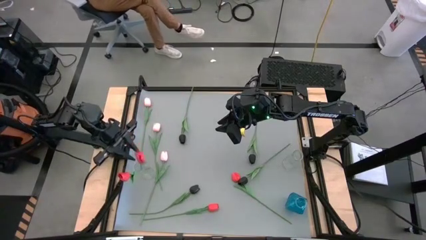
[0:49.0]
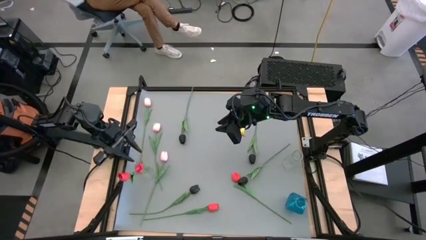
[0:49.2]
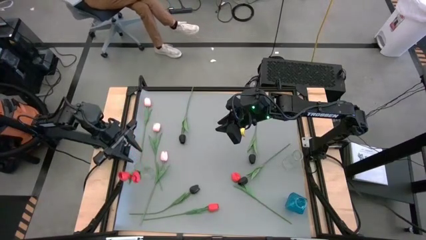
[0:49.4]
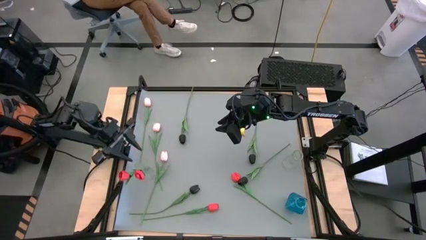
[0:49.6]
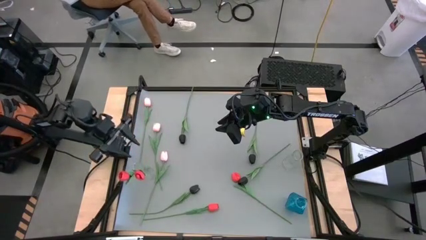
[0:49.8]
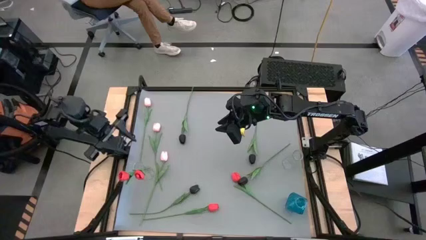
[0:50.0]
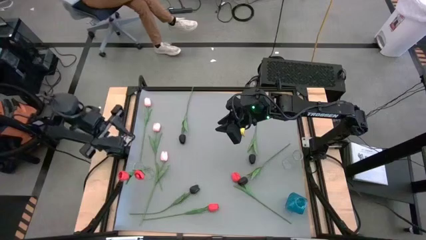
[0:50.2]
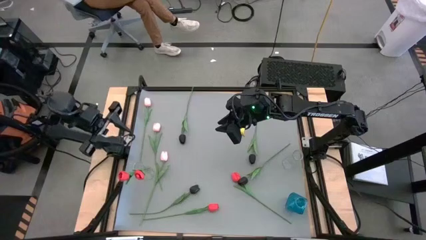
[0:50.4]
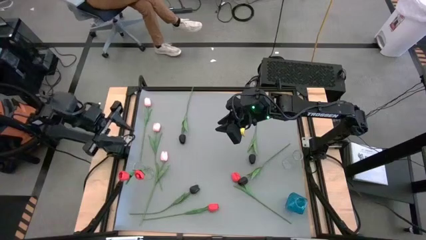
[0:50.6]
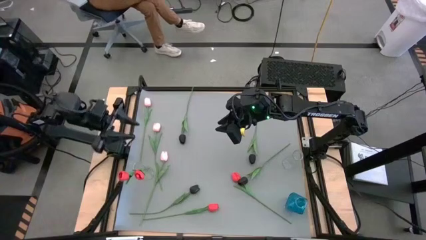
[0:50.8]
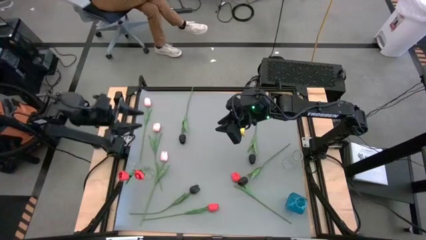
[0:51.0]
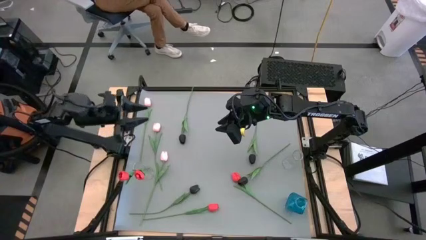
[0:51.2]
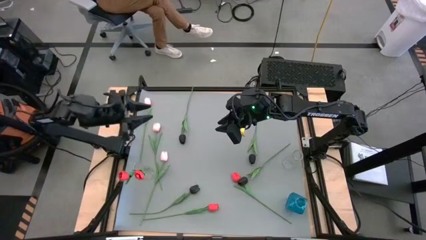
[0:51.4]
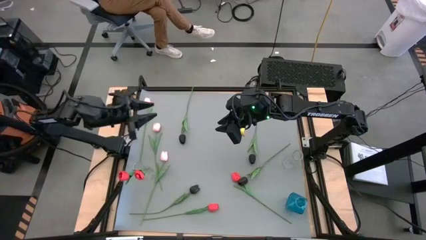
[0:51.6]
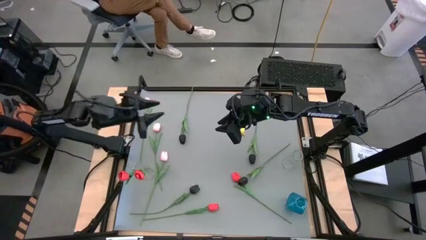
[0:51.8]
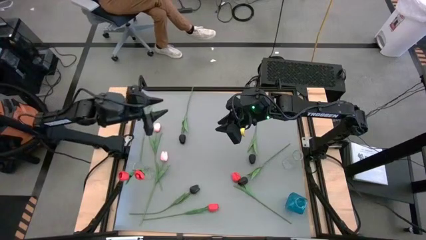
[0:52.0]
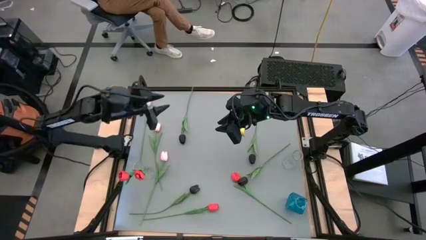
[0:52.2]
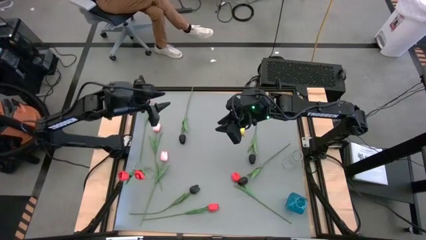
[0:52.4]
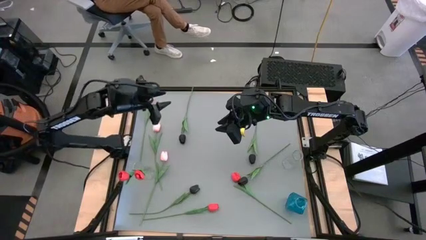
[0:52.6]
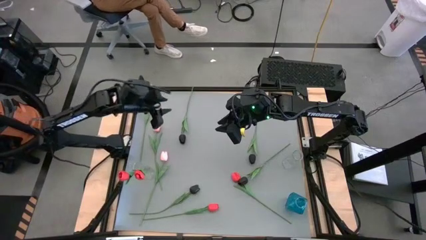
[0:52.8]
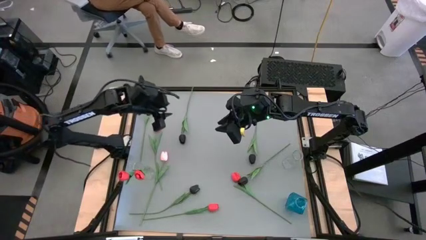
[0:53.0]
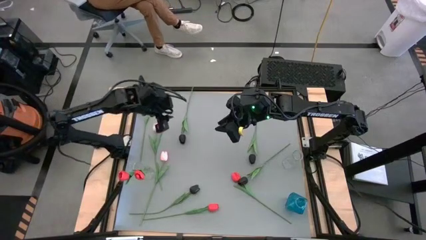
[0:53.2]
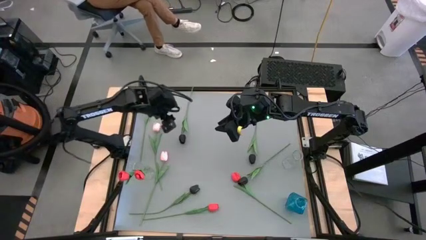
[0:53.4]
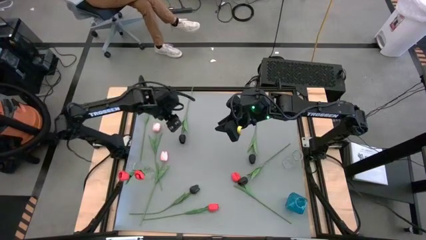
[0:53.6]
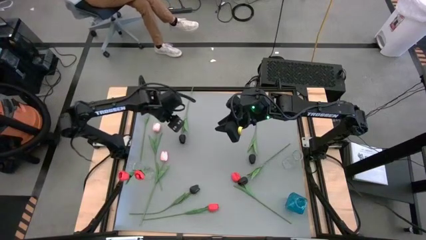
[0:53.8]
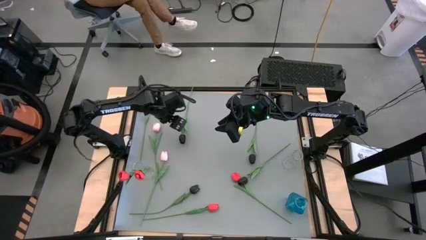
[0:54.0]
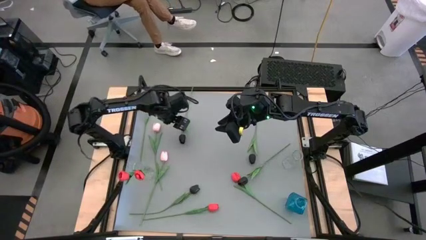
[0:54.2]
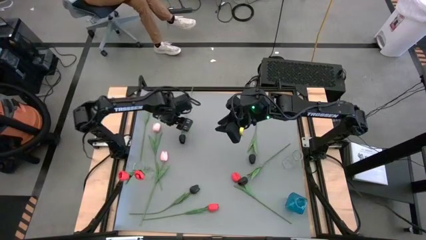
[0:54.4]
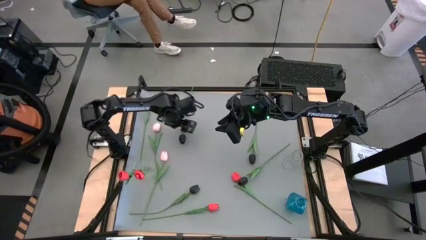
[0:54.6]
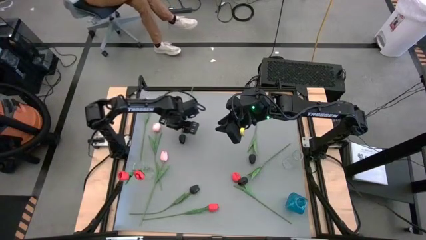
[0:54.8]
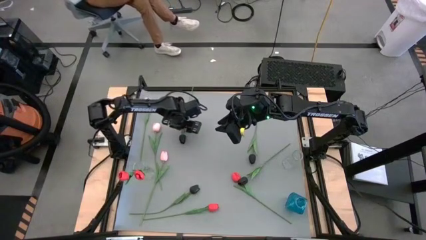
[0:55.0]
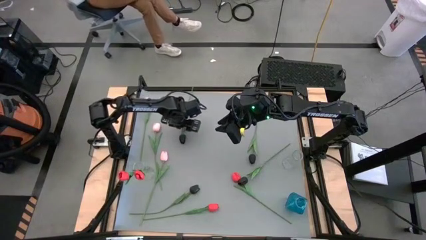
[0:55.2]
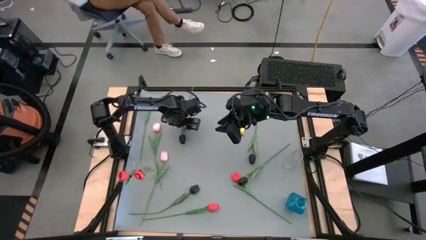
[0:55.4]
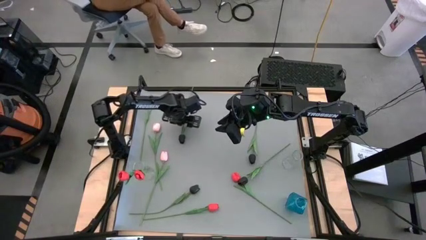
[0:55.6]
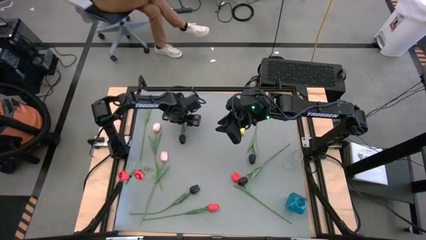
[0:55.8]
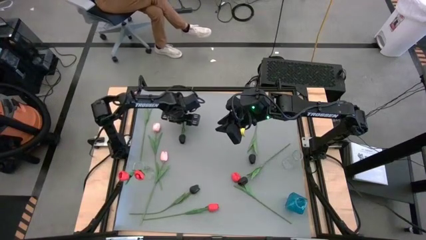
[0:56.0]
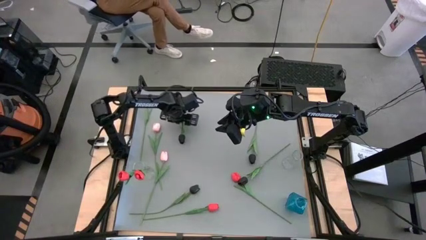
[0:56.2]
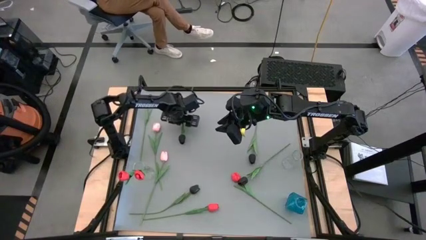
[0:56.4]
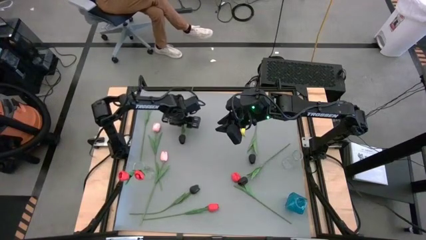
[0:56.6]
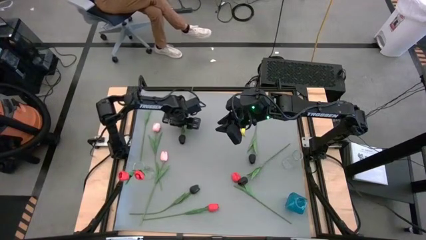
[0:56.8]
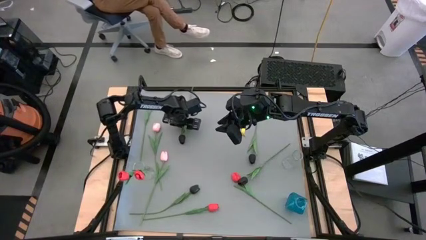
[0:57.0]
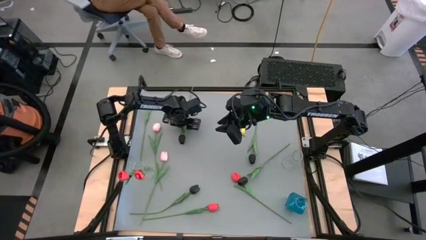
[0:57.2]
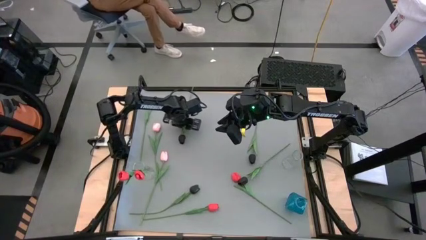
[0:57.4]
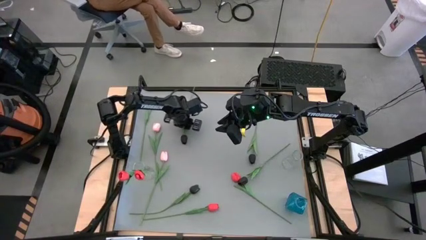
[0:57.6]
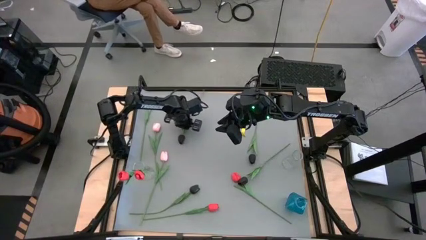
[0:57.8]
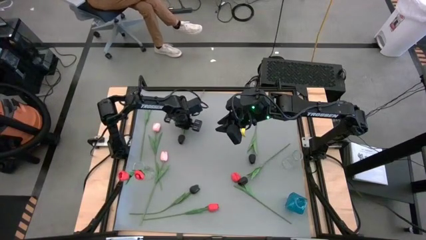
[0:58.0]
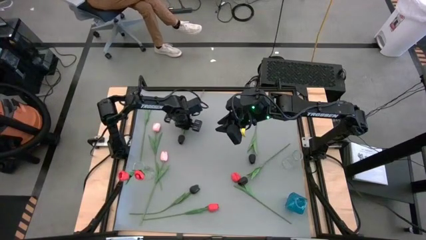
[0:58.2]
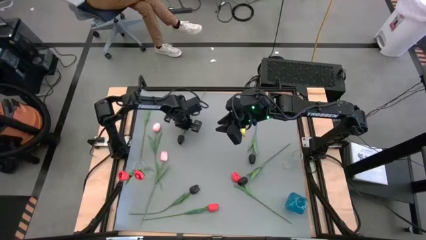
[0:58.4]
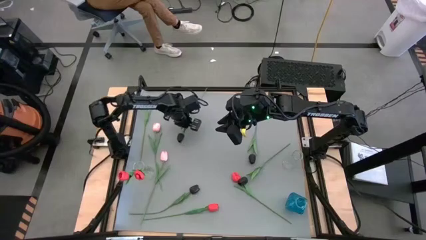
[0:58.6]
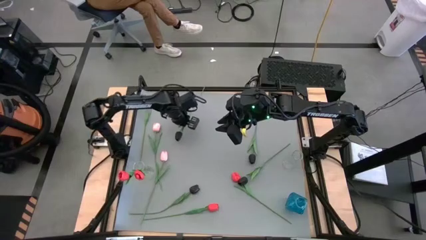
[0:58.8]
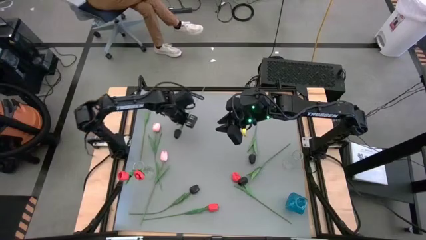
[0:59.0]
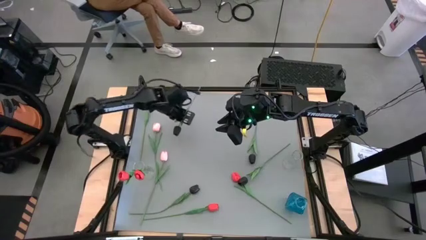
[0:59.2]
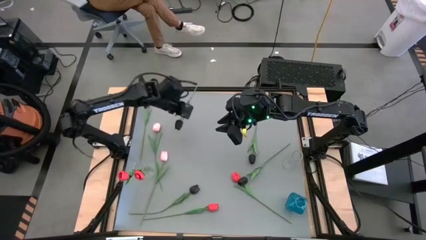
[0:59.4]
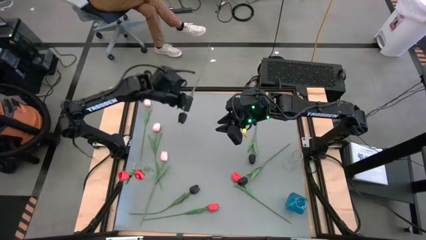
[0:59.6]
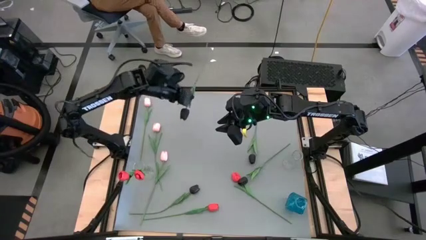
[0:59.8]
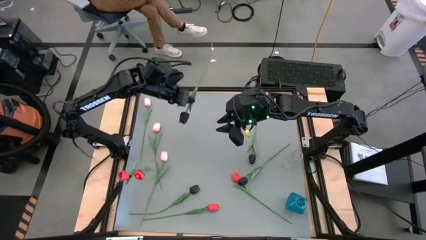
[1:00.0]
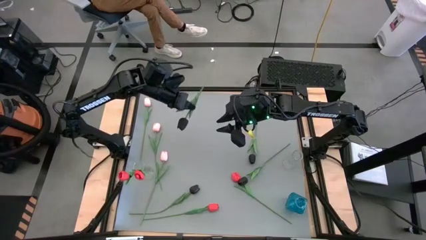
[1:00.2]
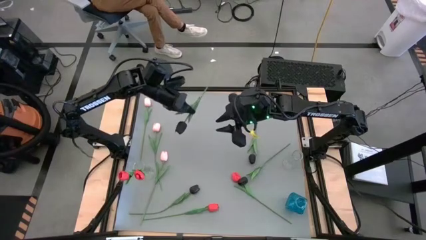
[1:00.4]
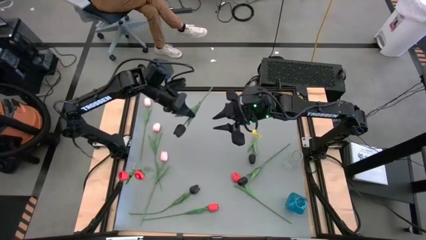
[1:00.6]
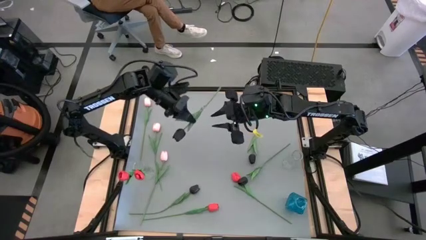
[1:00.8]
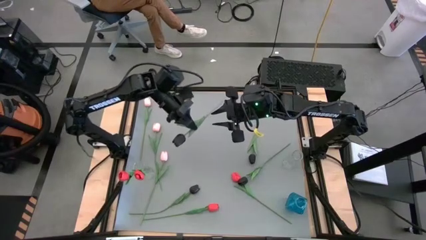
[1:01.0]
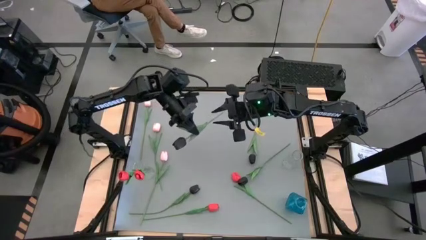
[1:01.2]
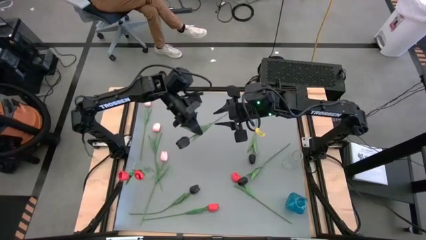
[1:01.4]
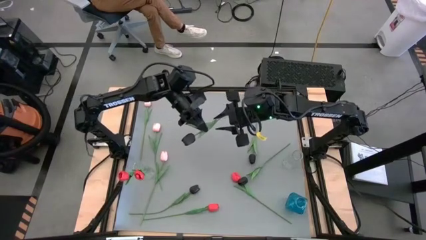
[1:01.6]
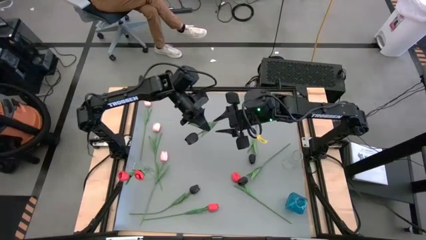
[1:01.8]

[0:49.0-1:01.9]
Task: Sort flowers into vase by color
Put the top left black tulip into the right transparent vase
